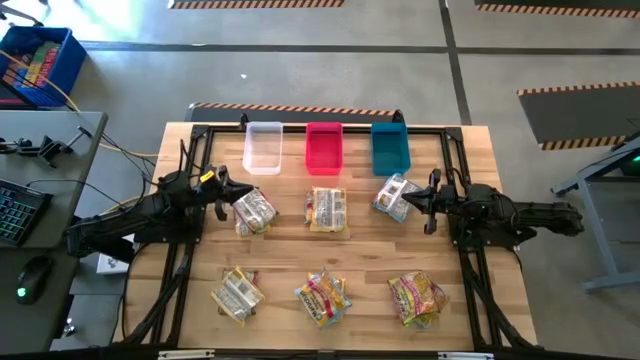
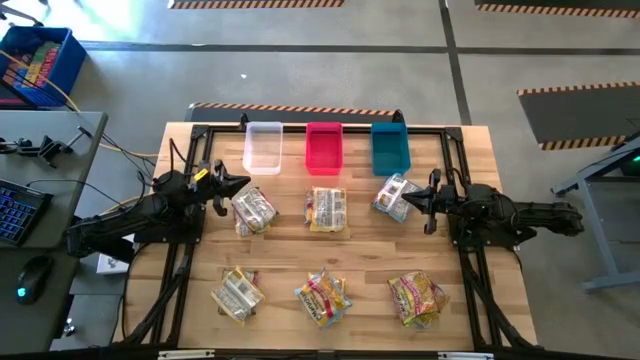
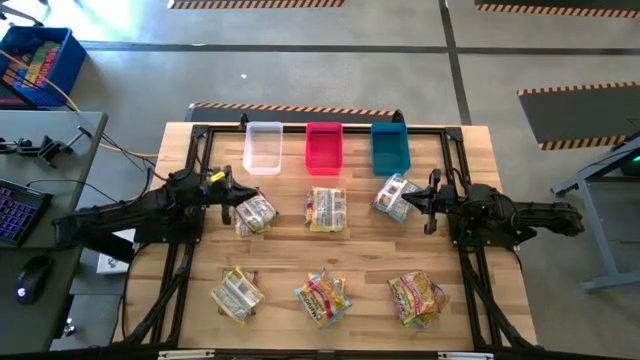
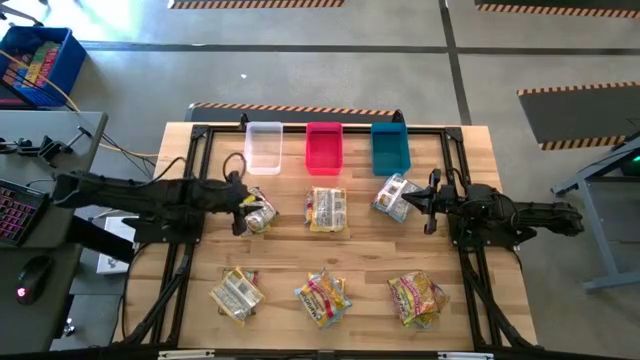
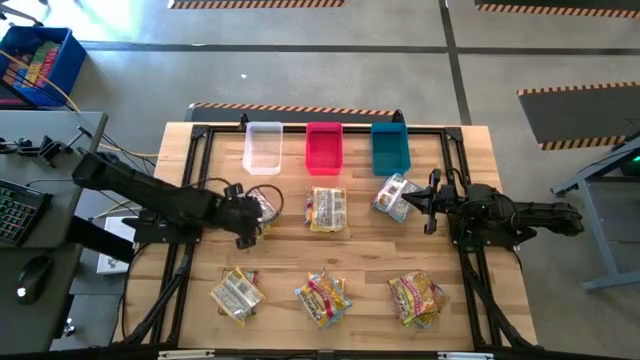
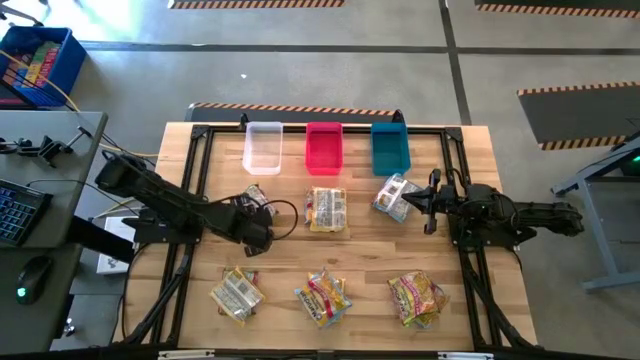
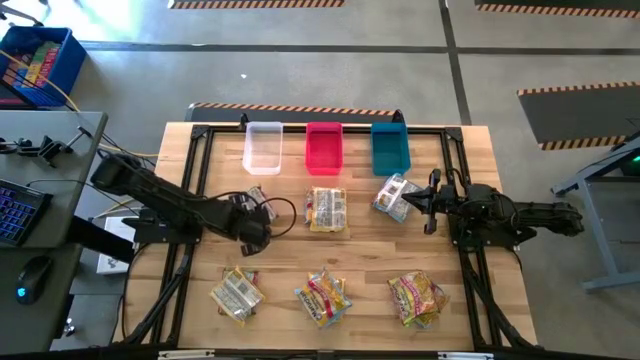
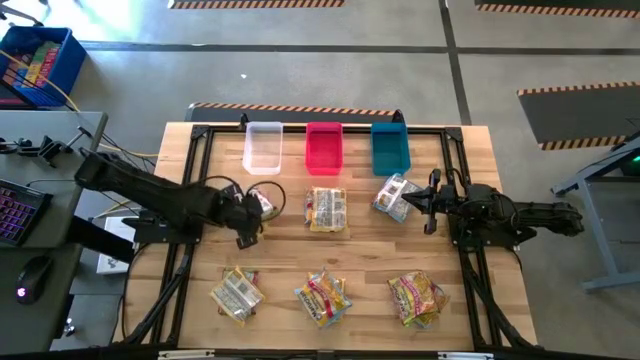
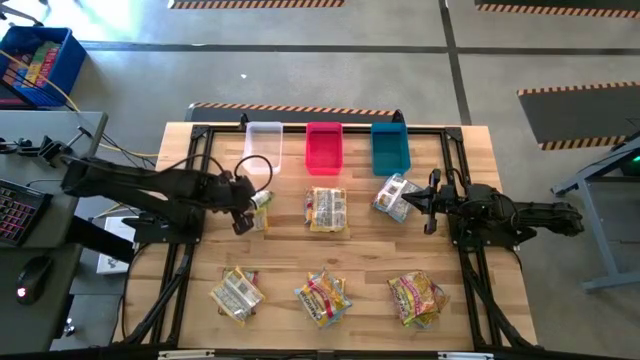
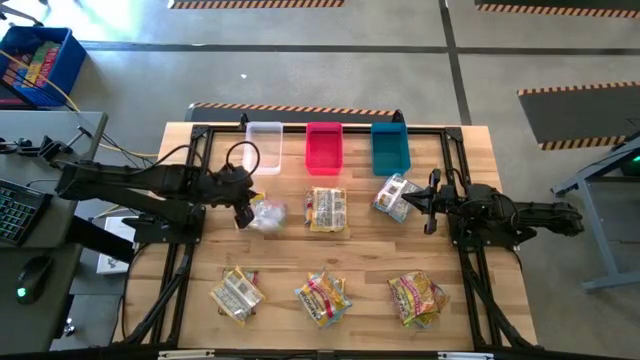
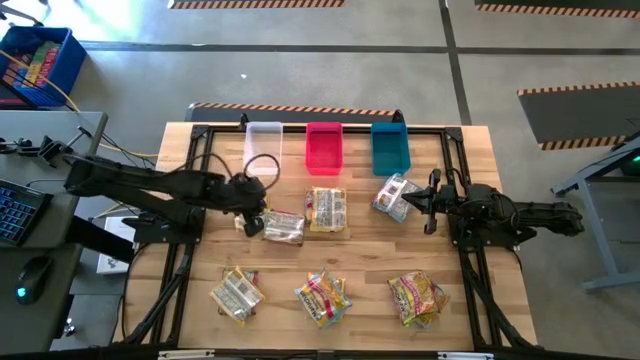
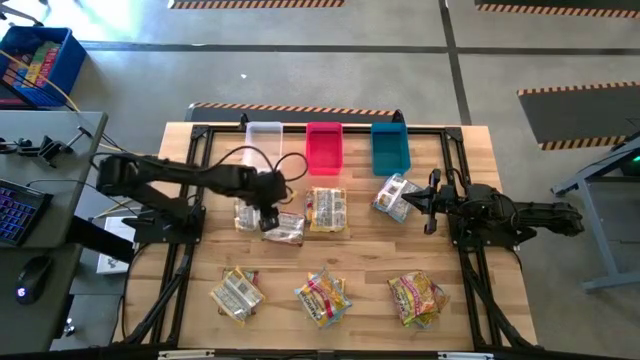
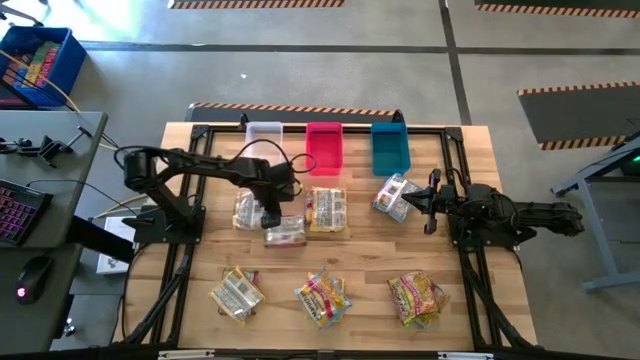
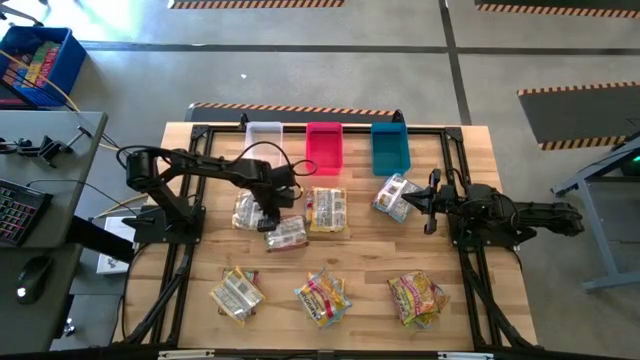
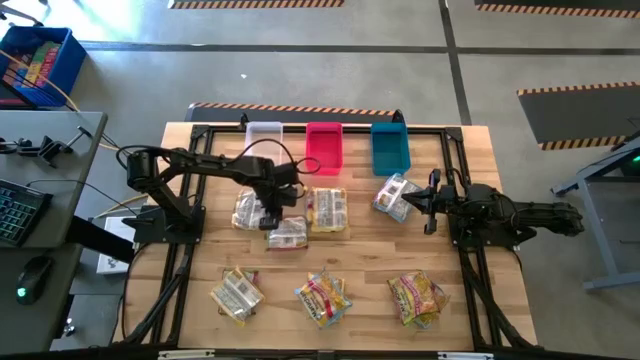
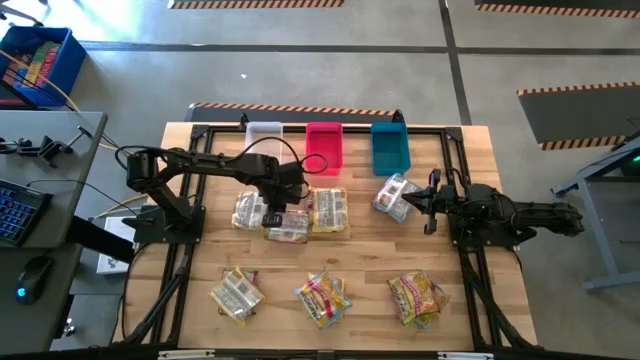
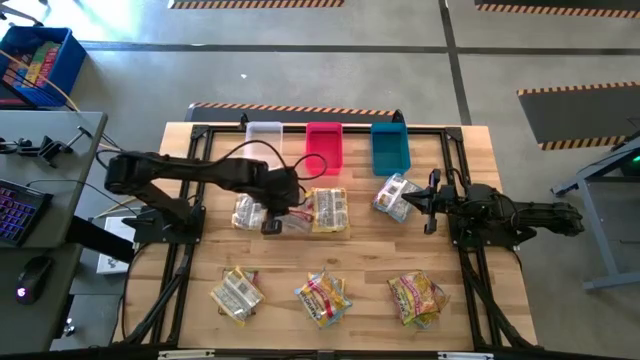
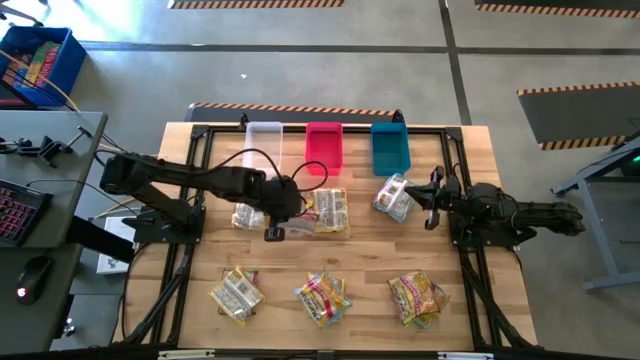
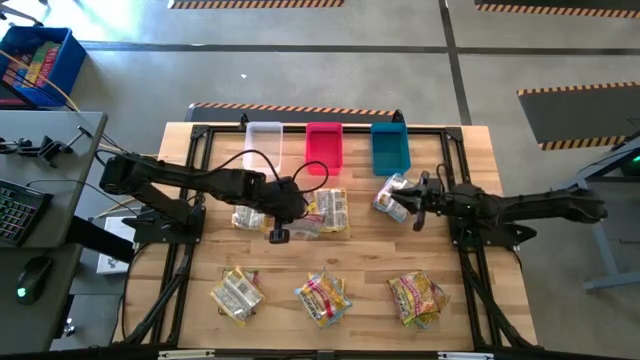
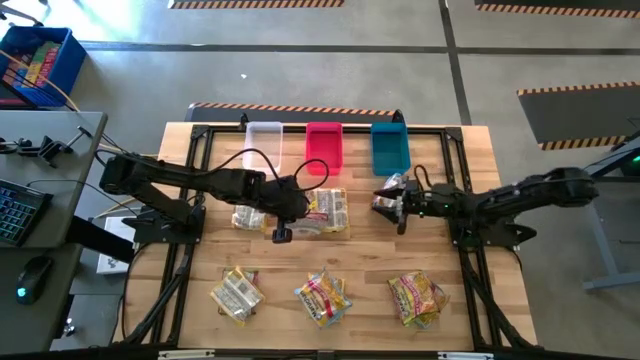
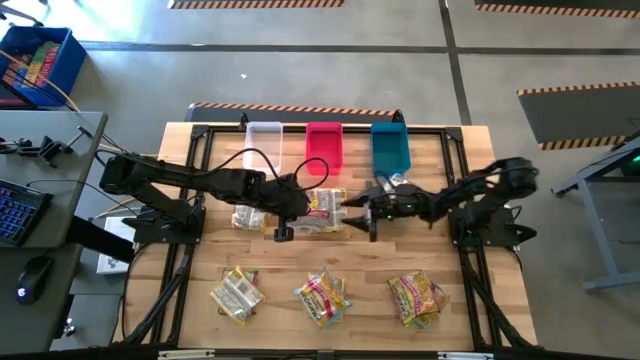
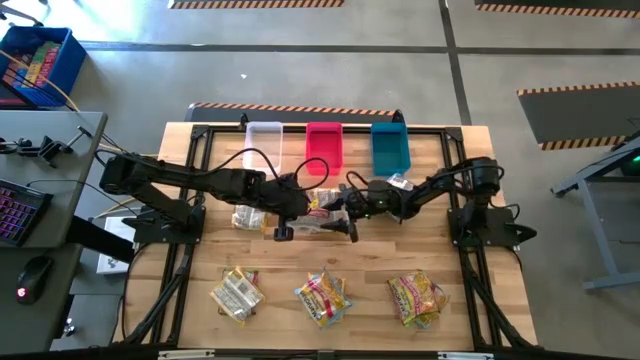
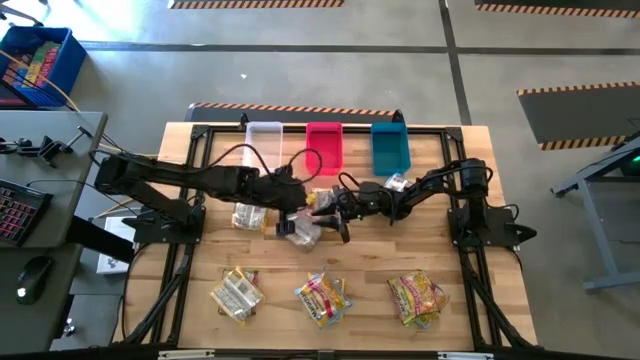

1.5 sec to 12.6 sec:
Task: Sort Maruchan noodles
Put the green noodle pack into the blue bin

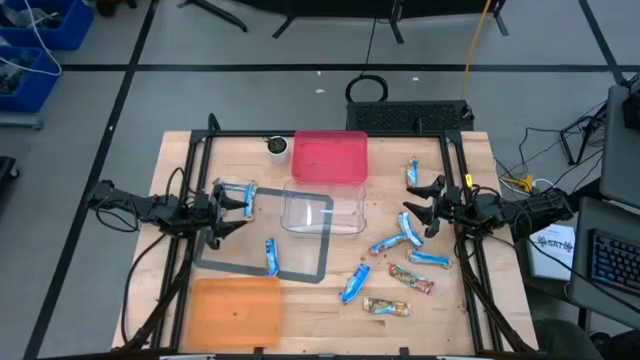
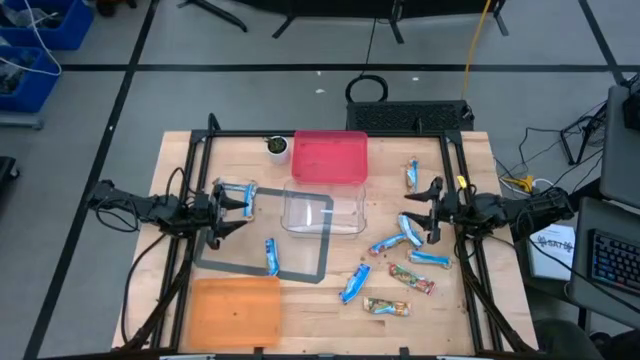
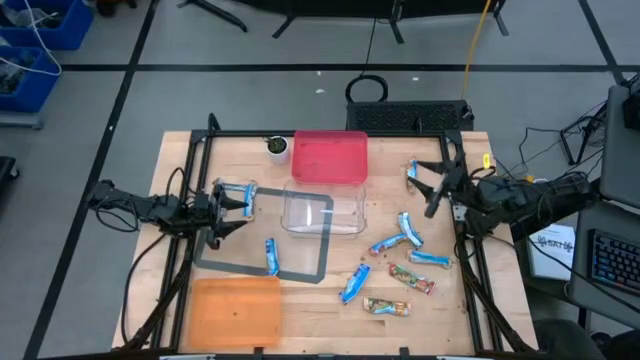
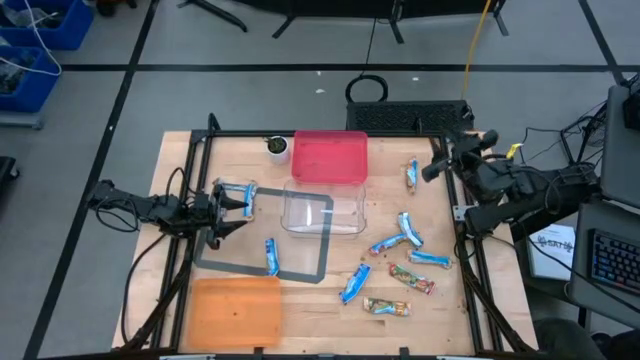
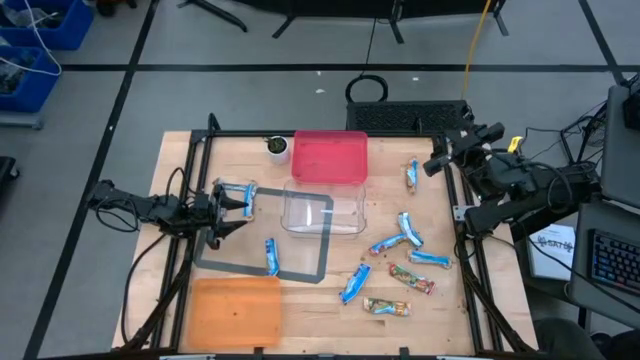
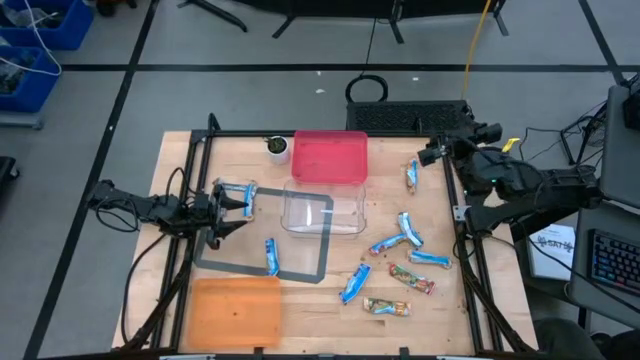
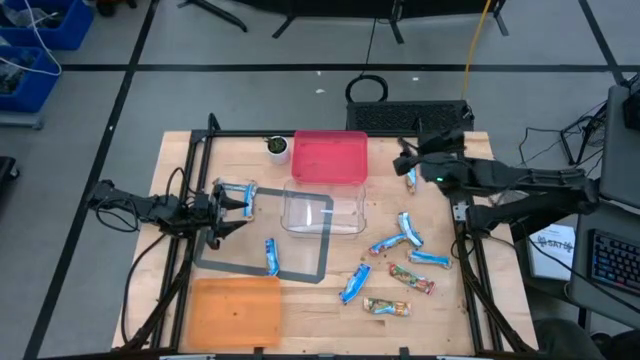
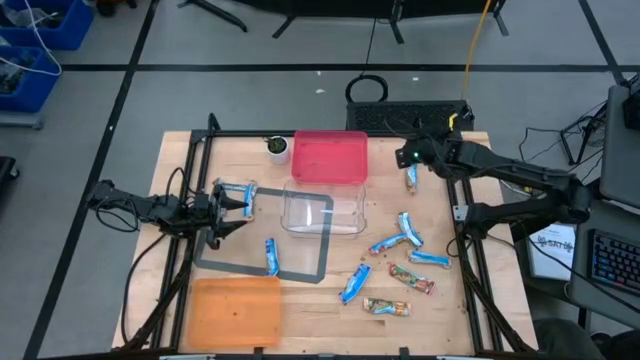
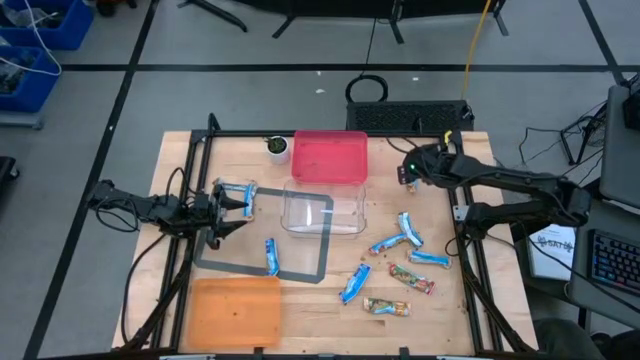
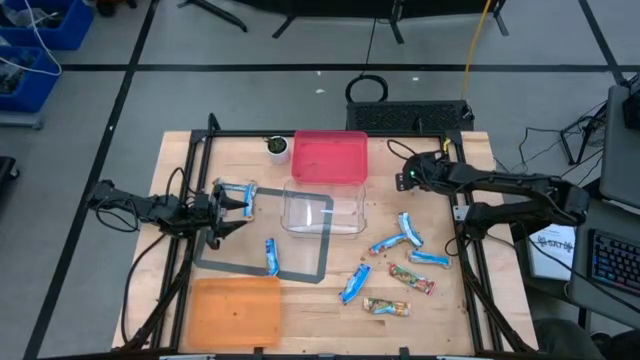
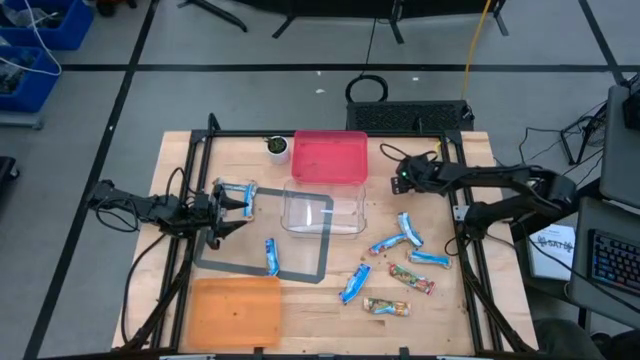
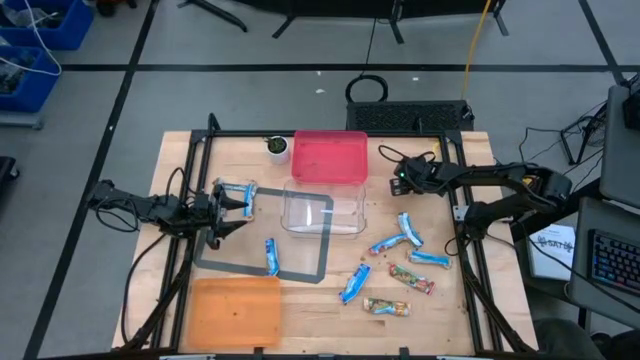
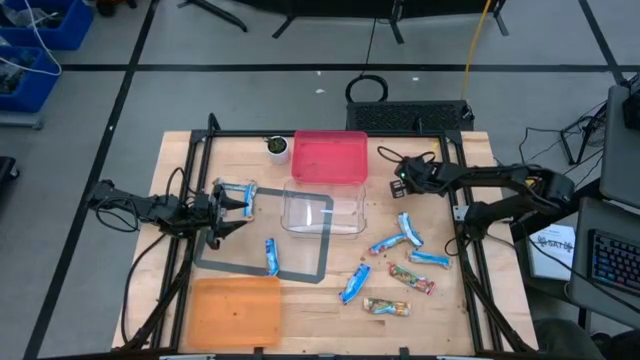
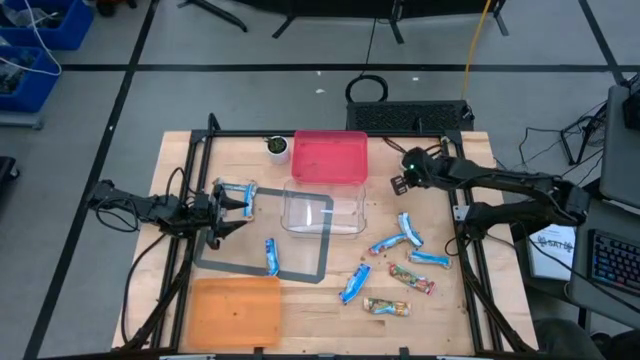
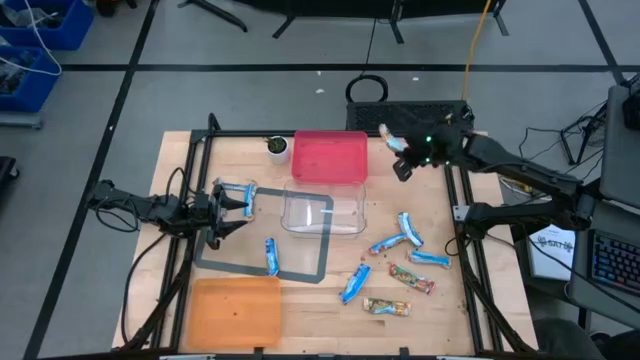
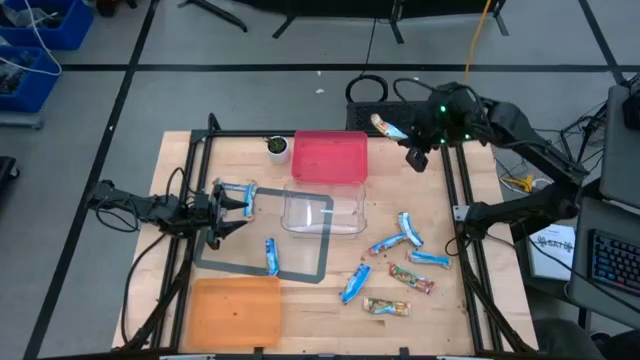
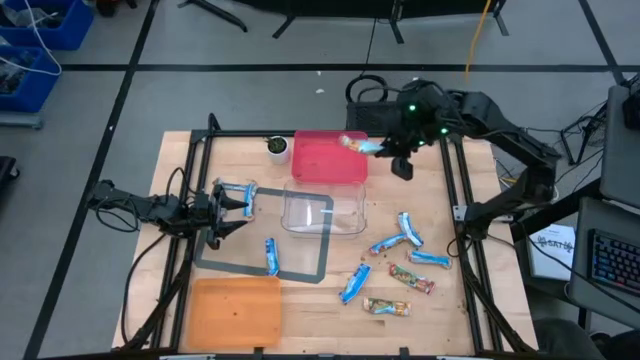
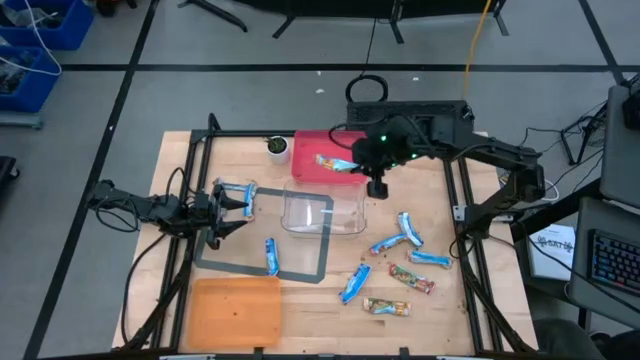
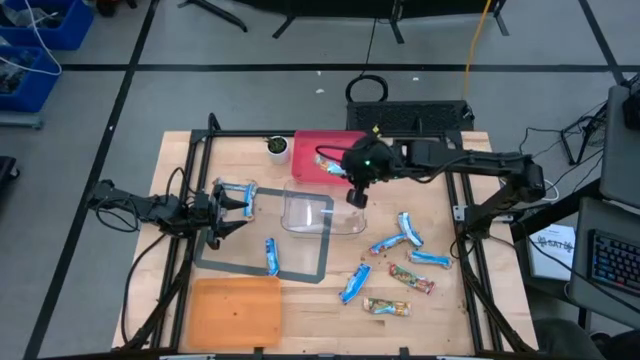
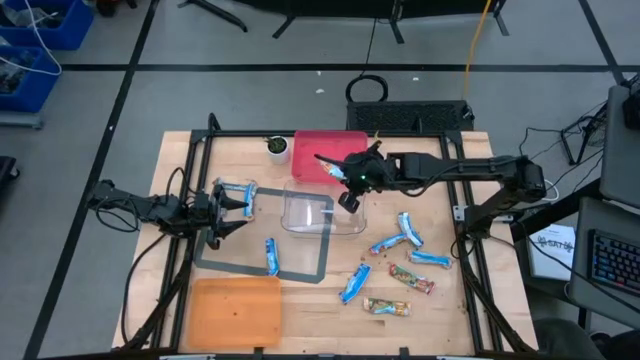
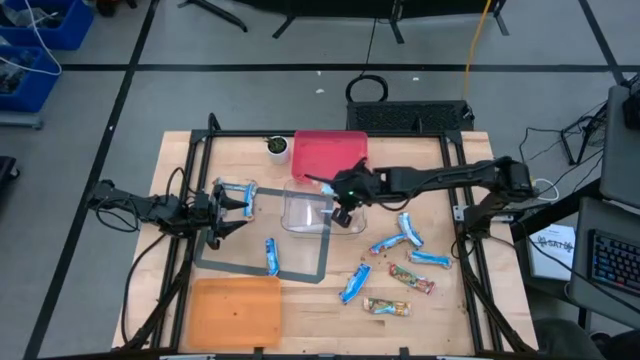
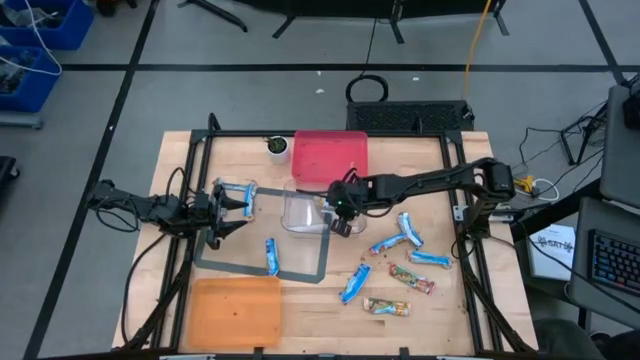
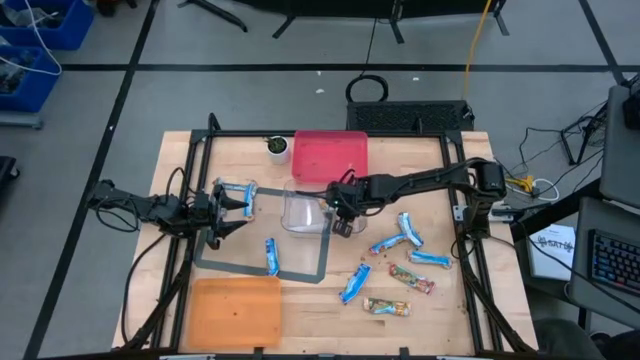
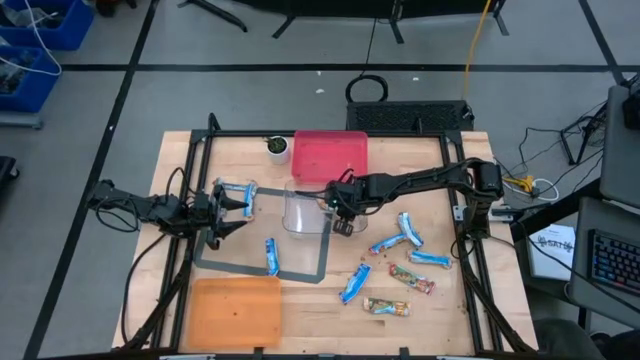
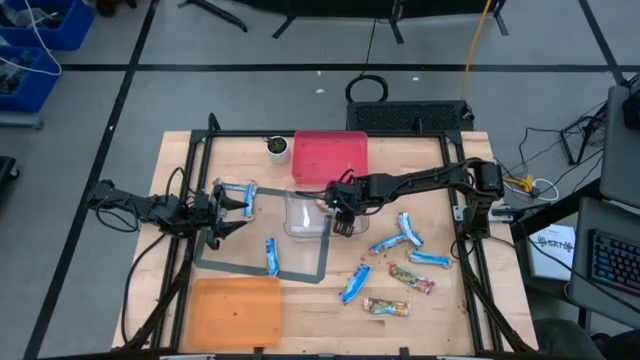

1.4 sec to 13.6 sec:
Task: Pick and place Granola Bars by type
Put the yellow granola bar into the transparent bin
